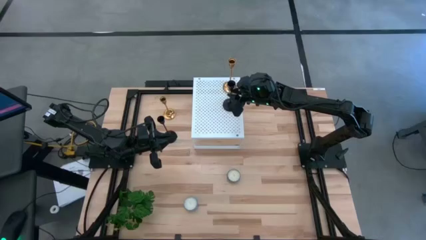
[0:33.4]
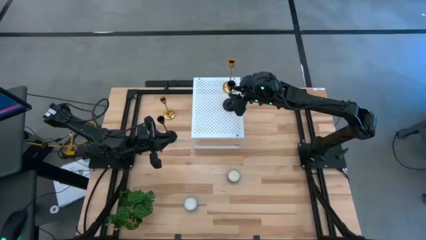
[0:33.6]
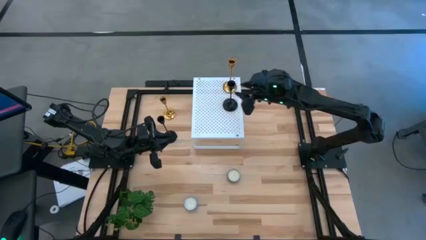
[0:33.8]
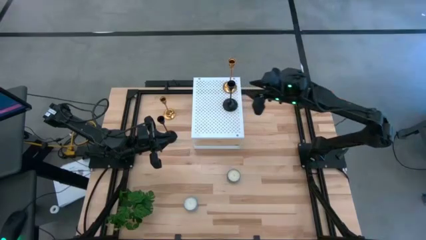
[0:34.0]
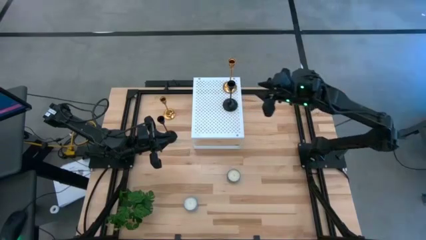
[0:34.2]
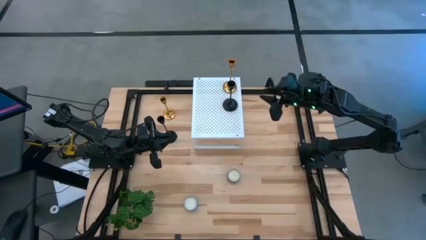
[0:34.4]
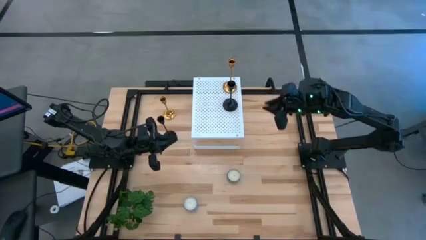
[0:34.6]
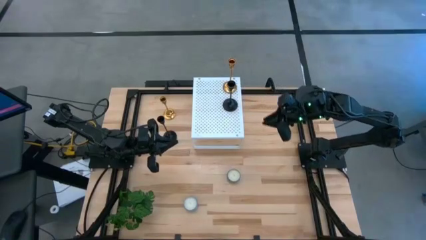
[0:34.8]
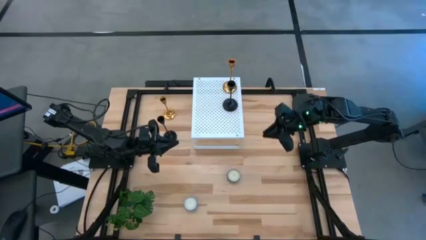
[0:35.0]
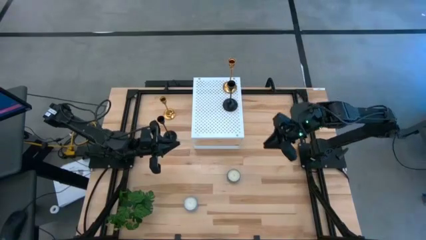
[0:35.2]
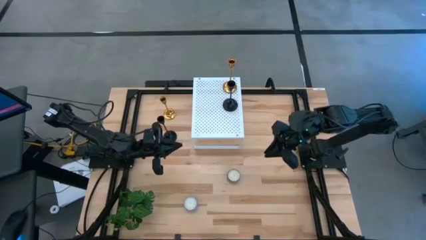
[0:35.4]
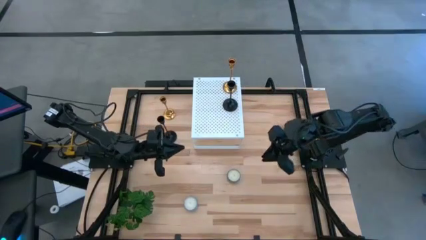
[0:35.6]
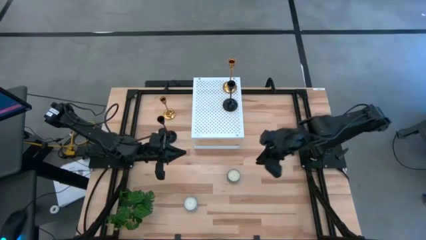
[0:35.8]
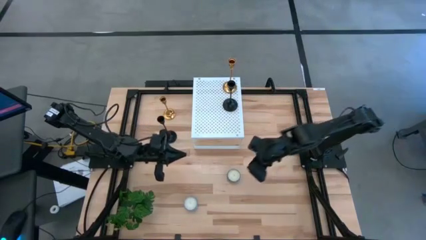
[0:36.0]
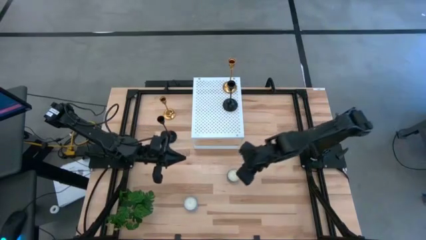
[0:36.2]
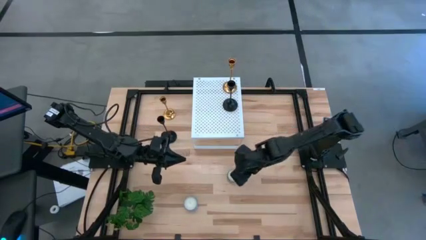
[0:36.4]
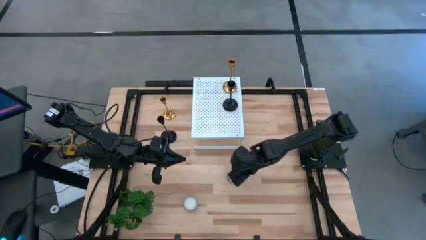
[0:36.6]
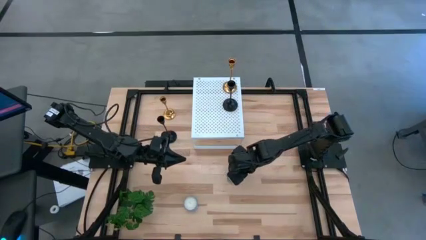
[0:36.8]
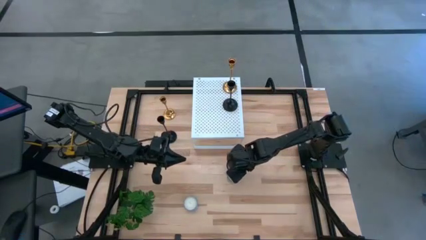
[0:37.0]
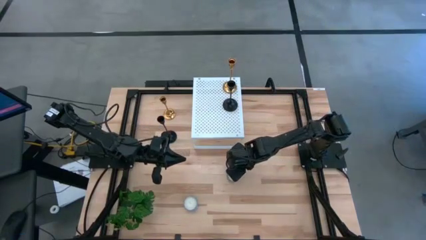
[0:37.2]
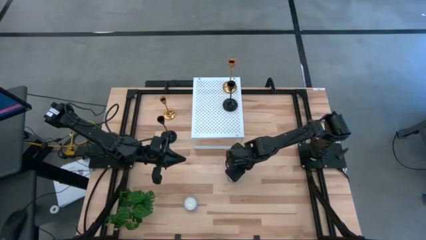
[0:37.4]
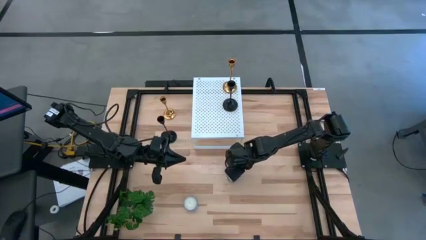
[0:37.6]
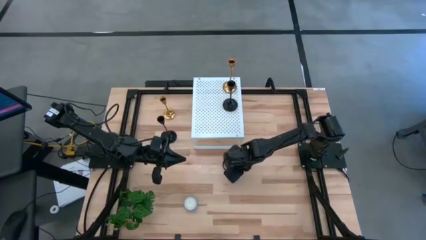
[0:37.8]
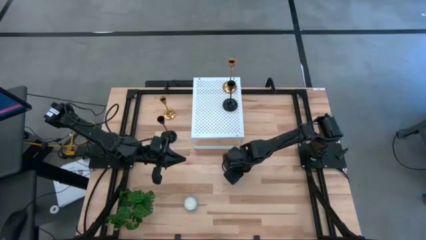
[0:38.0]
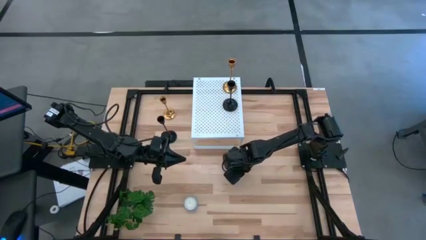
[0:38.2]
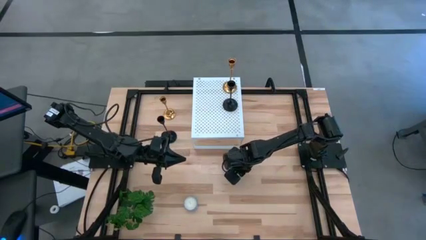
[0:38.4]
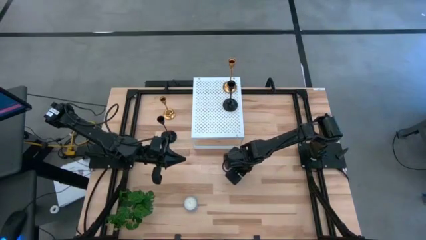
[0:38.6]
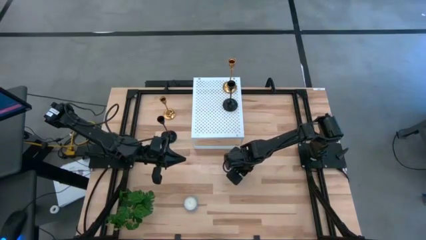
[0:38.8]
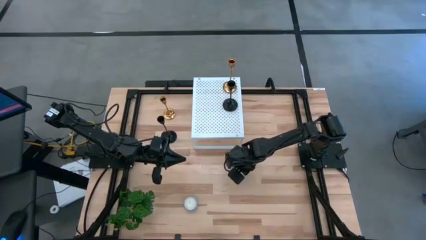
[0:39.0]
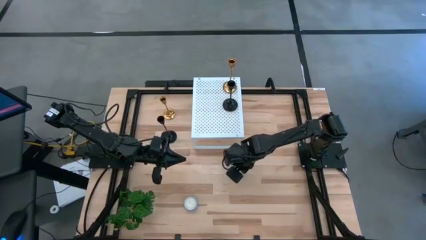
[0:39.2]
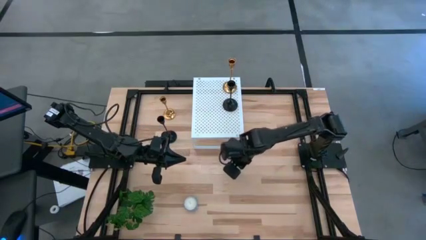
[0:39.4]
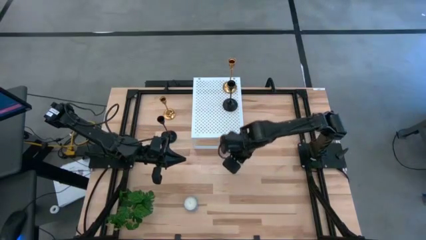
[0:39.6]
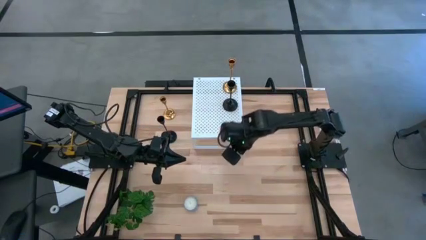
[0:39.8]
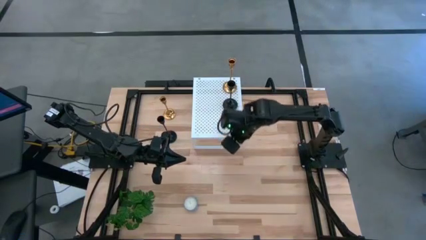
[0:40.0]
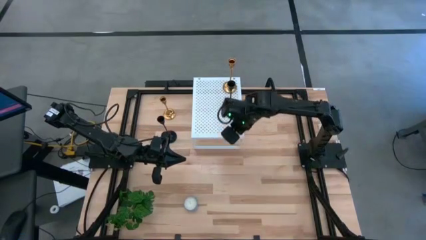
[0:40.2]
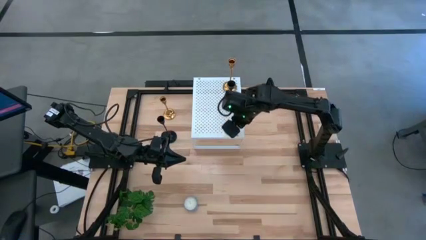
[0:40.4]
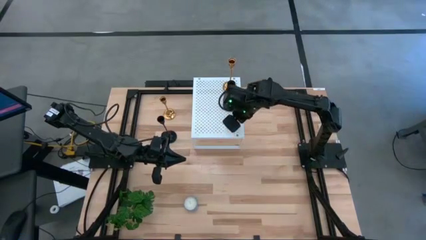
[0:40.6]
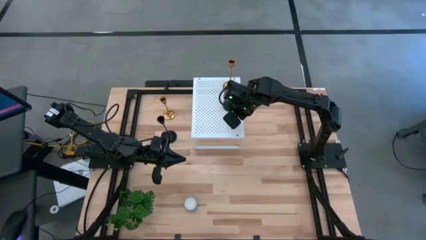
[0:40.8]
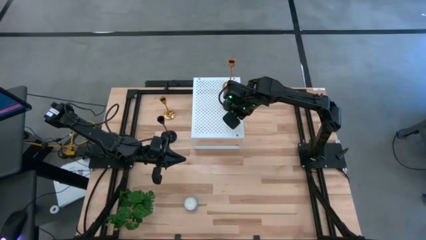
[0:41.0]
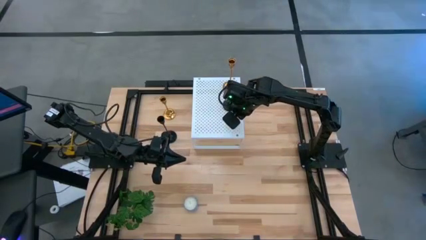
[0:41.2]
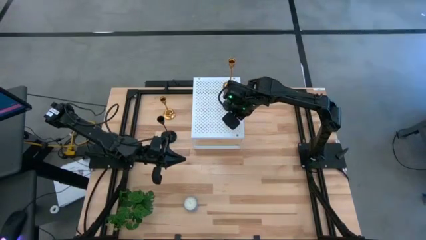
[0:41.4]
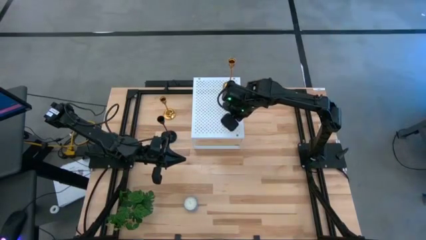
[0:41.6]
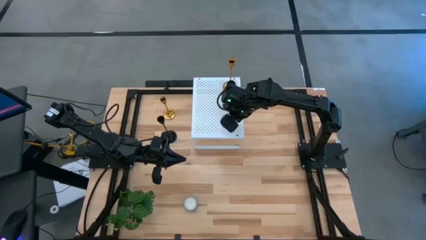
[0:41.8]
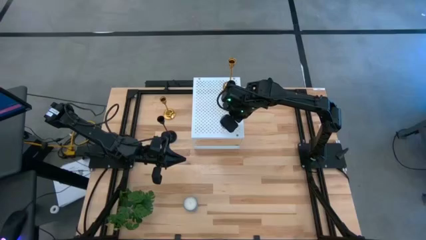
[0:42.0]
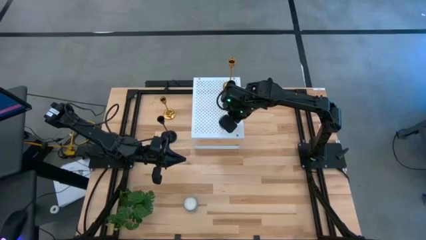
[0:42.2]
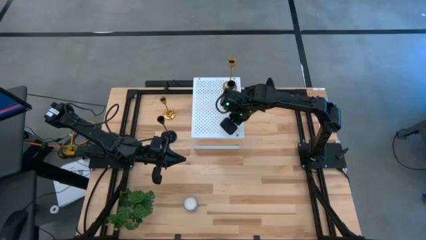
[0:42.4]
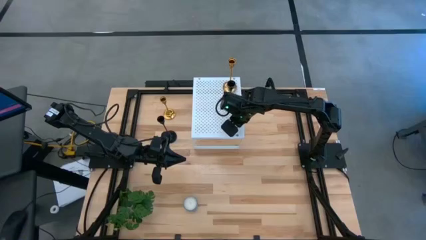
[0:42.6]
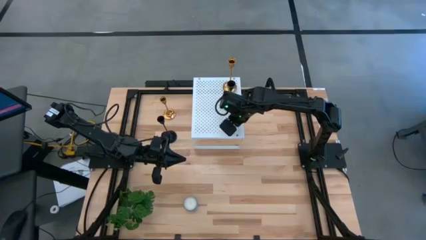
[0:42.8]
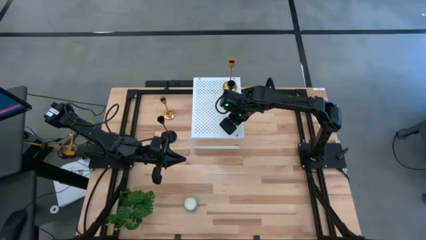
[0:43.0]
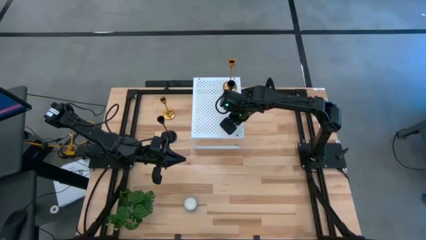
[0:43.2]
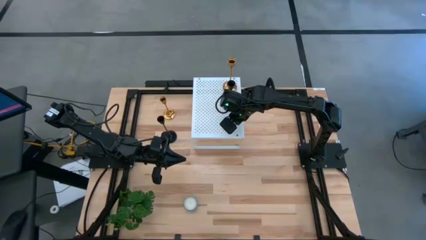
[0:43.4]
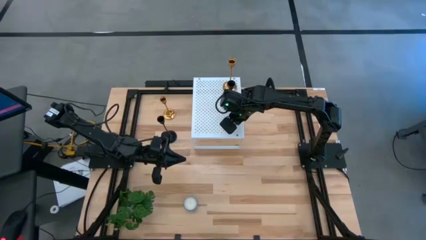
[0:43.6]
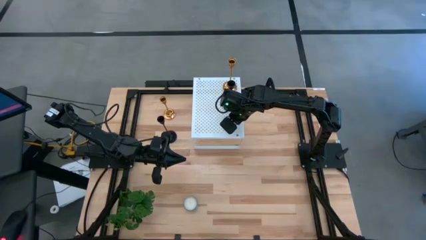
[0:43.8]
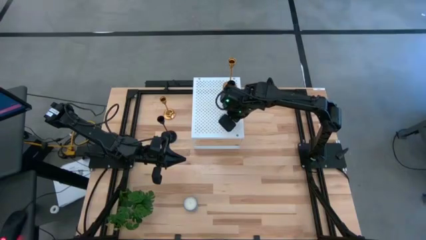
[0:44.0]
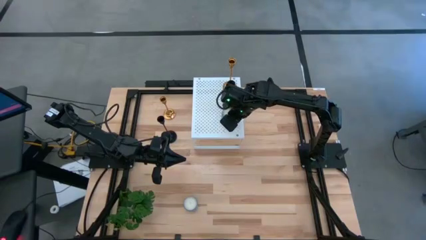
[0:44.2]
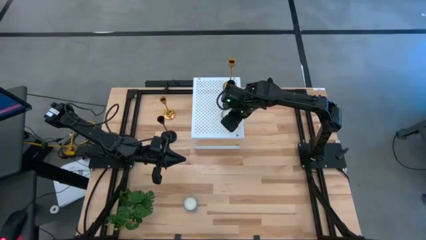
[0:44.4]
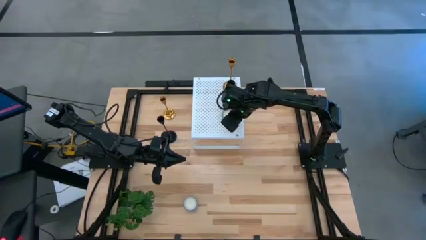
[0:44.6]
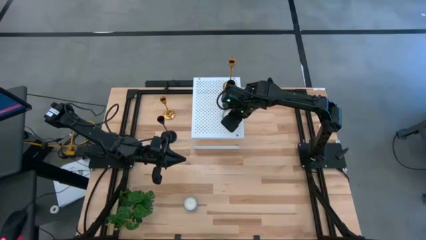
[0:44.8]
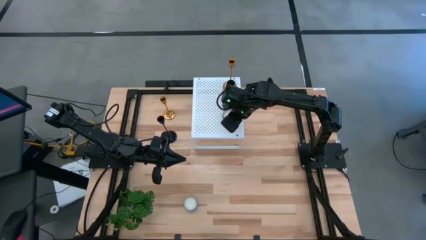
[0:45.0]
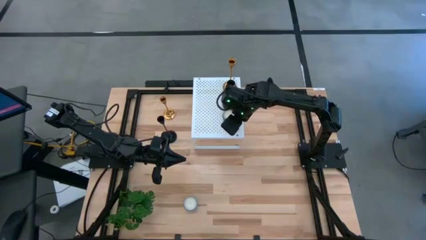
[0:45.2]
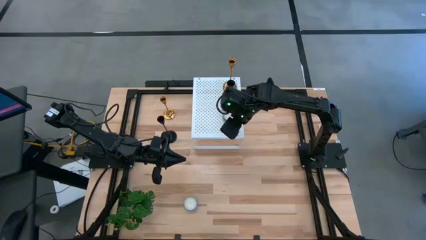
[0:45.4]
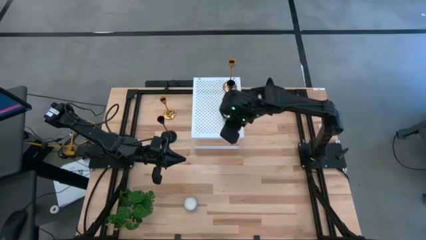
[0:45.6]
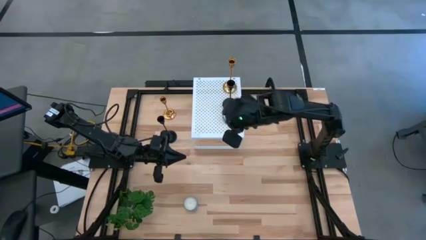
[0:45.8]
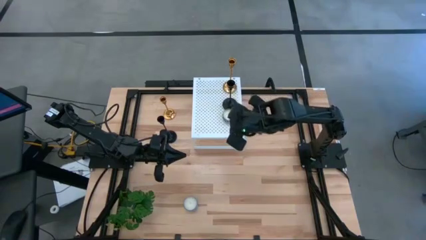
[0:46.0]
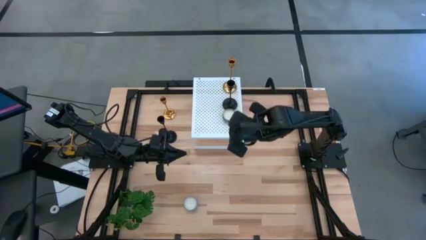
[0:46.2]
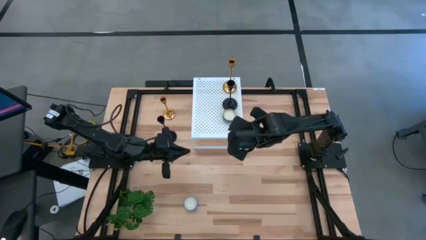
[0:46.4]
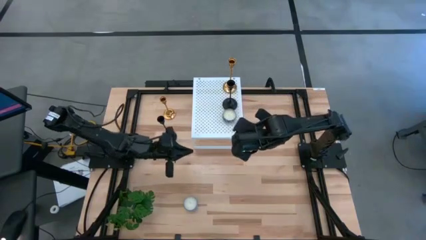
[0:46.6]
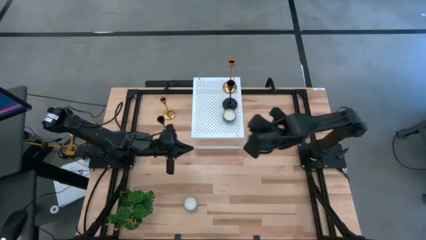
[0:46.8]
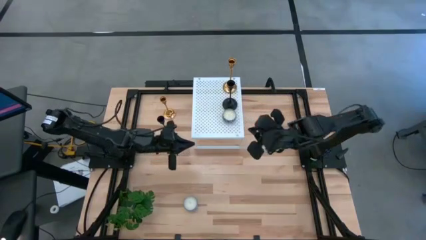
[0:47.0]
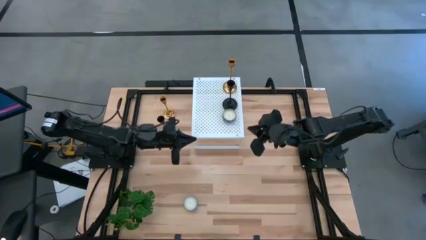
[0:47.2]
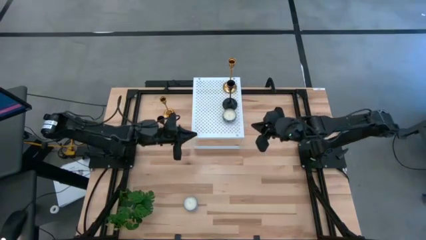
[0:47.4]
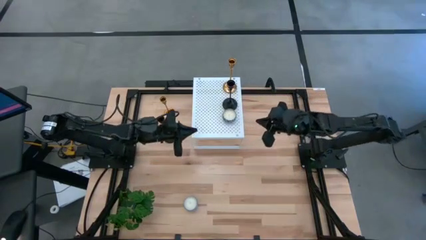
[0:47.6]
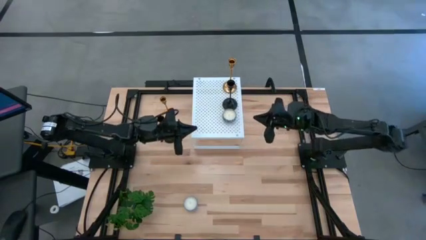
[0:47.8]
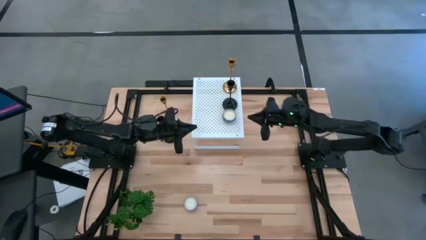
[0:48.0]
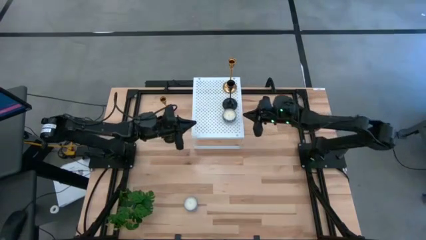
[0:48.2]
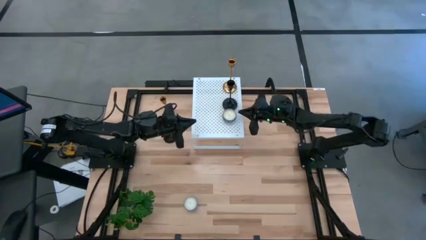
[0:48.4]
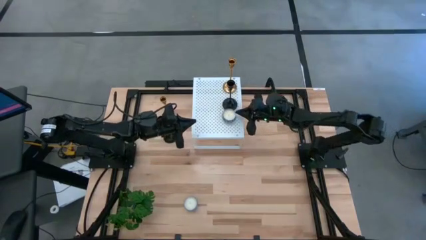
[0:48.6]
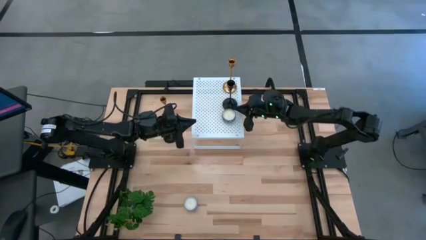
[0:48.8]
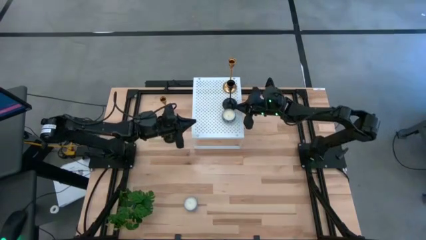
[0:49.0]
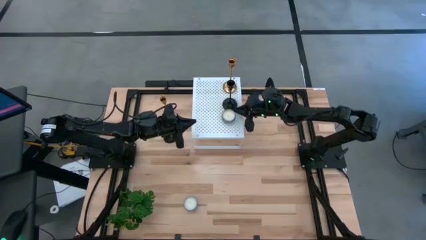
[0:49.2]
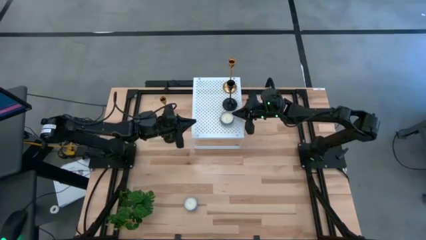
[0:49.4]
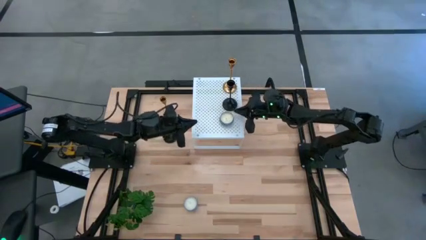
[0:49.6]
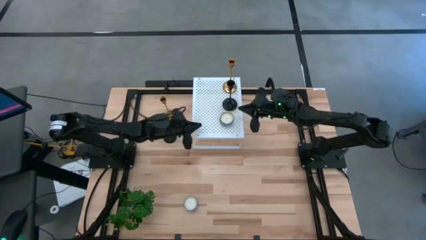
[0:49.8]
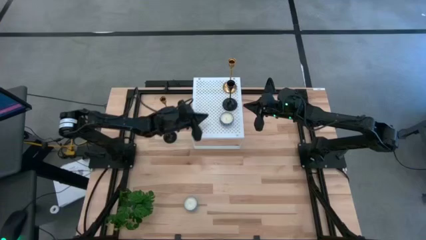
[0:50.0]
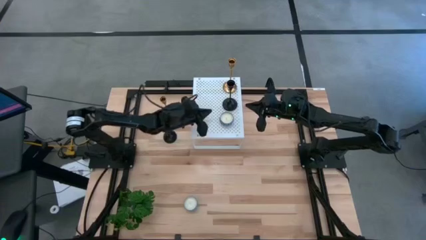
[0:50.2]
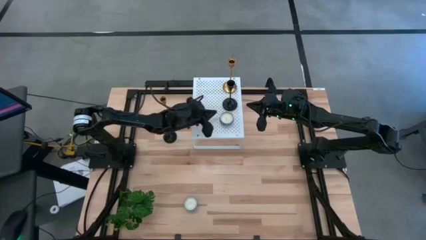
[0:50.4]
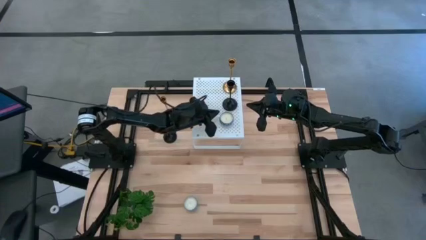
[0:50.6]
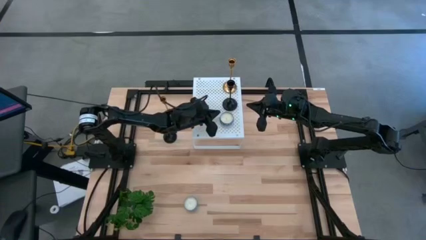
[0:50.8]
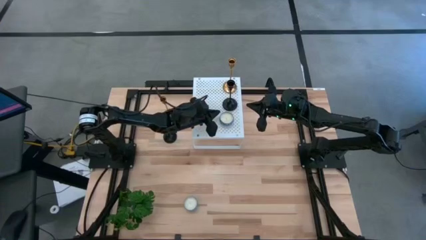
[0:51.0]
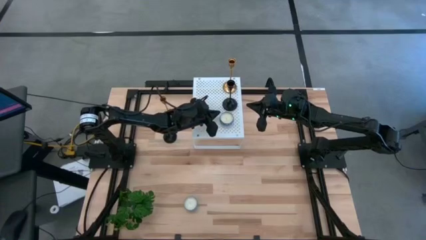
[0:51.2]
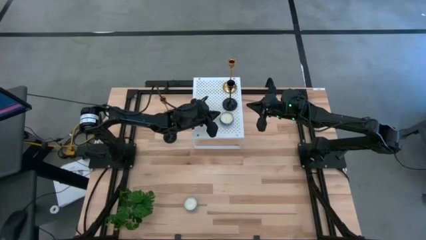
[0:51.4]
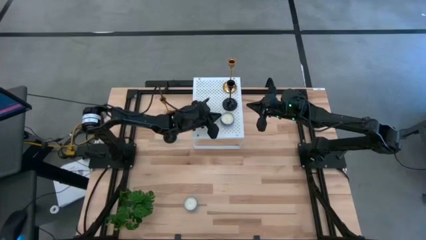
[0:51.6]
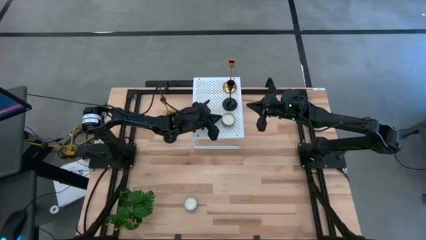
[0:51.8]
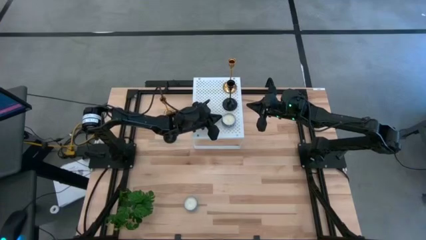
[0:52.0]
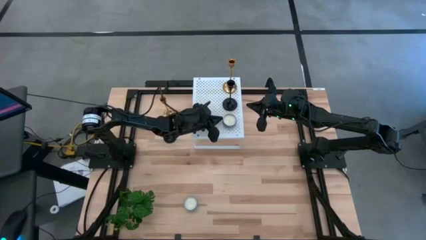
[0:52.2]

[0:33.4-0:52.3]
Task: Pick & Place candle stick holders
Put the dark blue patterned scented candle on the shelf
